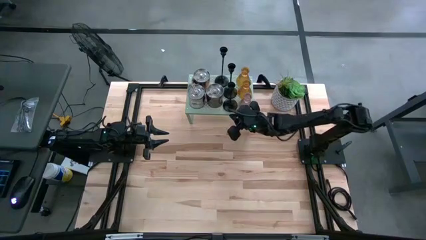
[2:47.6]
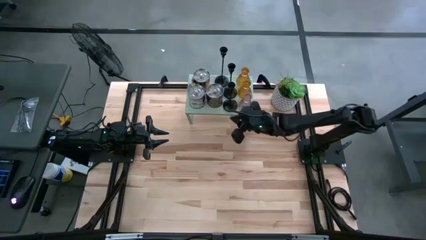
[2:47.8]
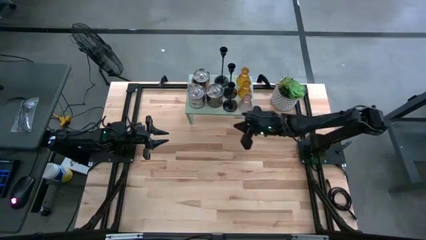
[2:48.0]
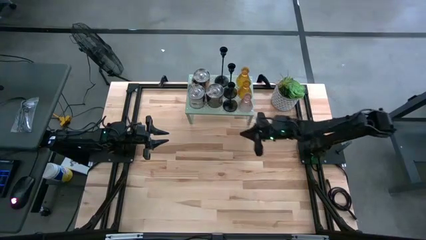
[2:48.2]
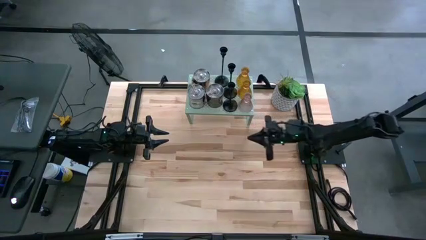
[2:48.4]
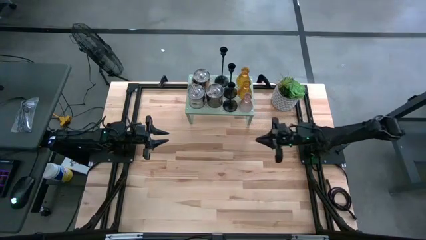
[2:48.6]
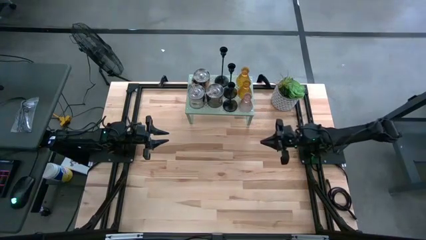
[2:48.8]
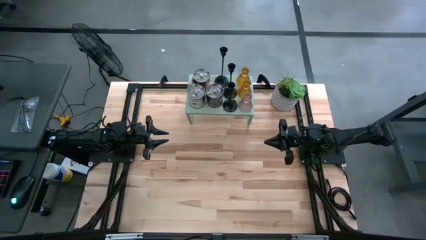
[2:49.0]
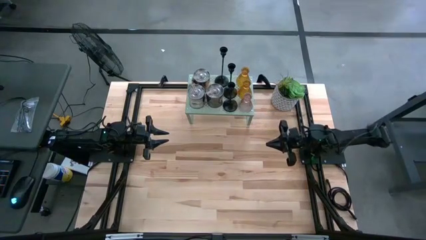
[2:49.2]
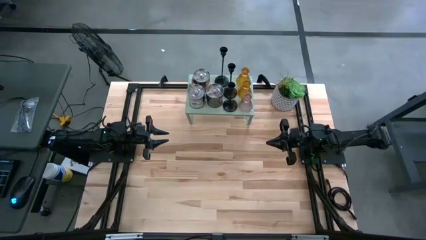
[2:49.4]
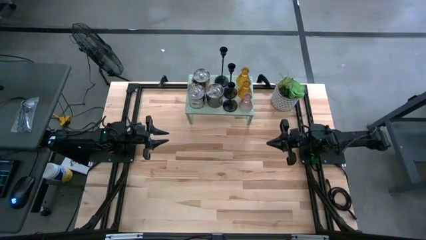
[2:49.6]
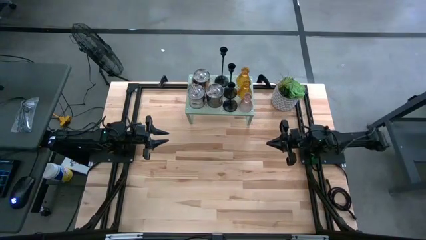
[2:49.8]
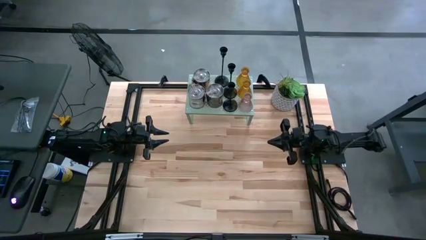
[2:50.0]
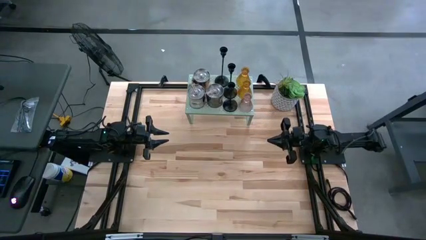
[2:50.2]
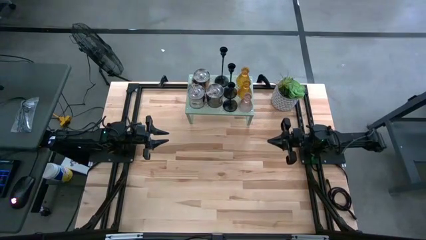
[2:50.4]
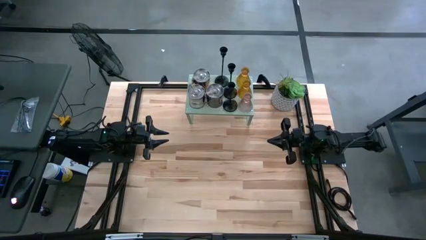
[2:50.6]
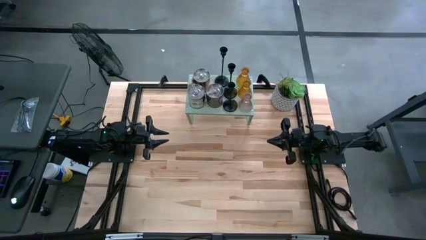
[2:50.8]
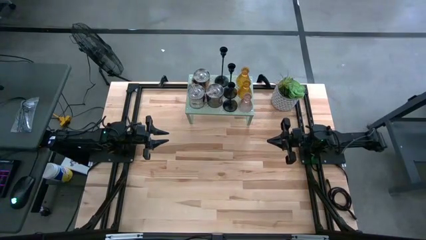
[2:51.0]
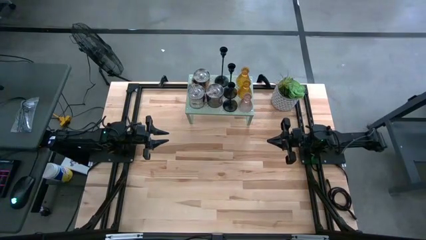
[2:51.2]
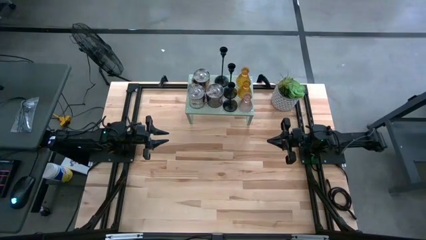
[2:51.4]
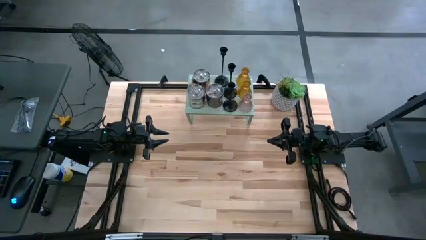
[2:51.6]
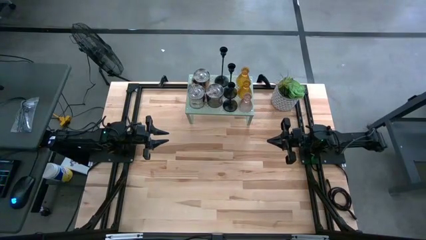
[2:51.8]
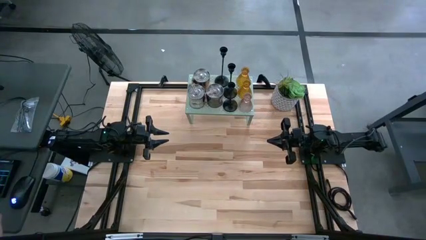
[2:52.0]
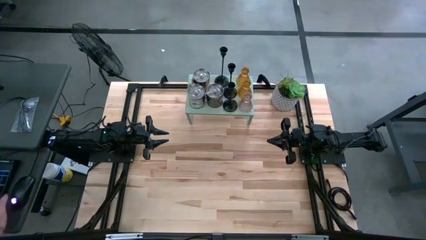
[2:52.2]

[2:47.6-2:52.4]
Task: Pick & Place candle stick holders
Return to Home Position
